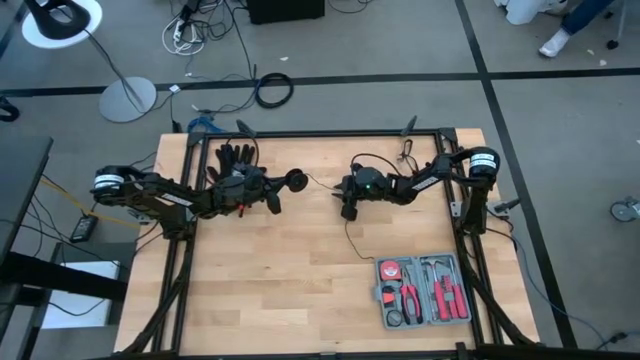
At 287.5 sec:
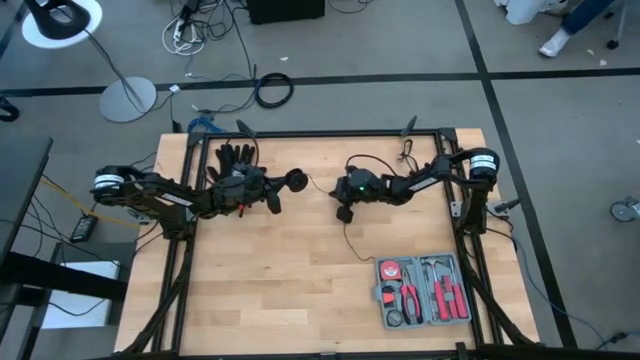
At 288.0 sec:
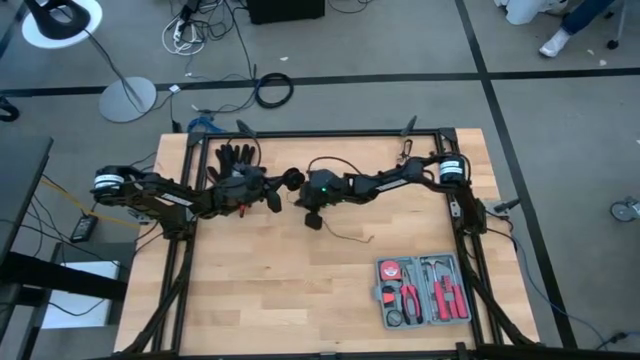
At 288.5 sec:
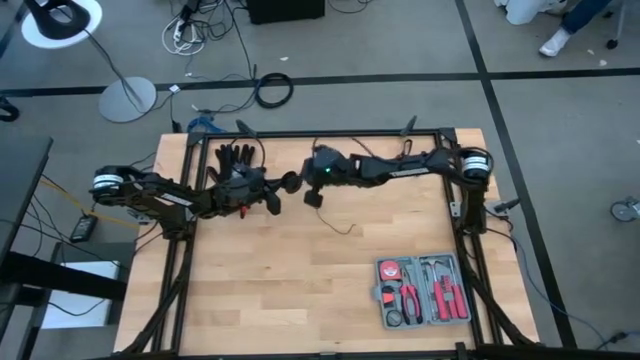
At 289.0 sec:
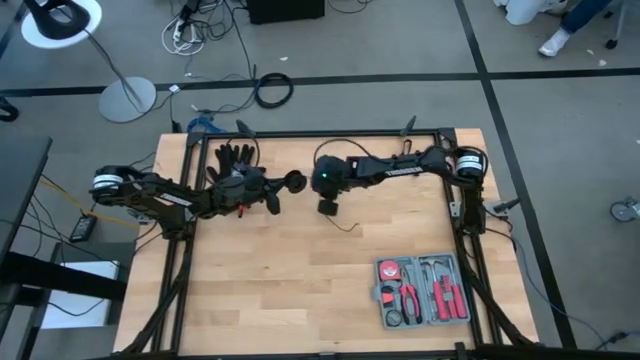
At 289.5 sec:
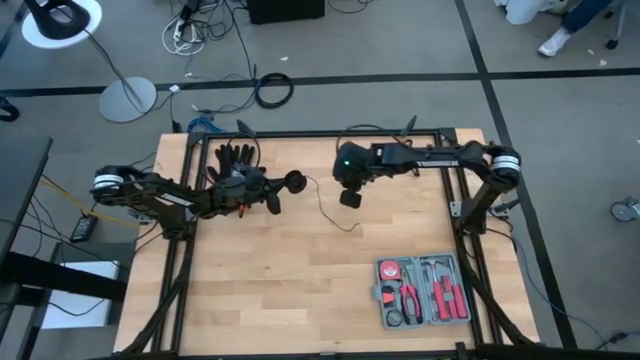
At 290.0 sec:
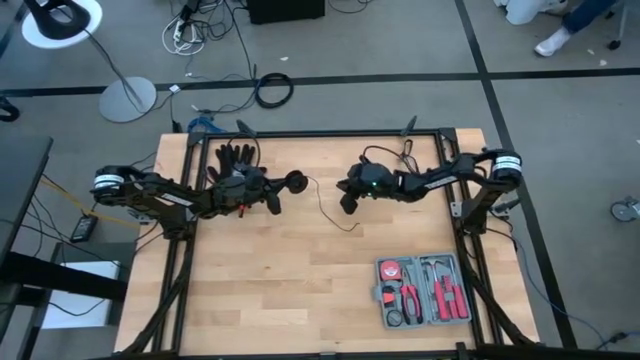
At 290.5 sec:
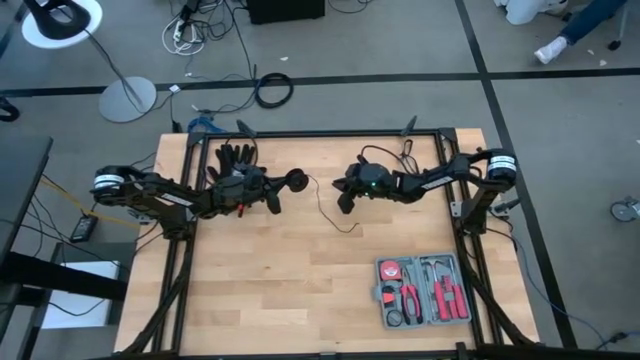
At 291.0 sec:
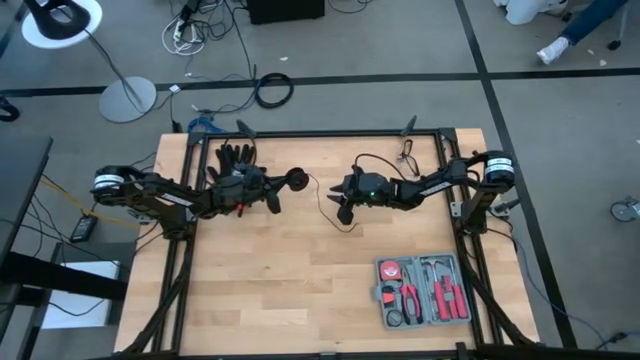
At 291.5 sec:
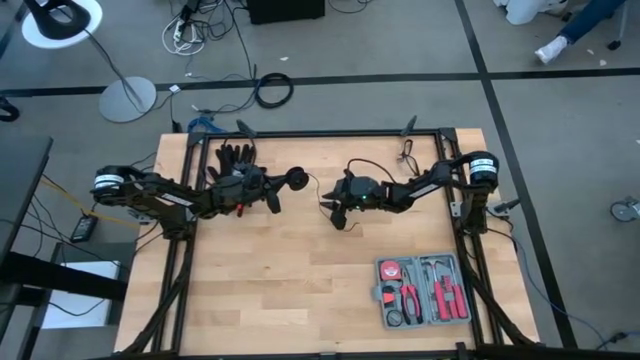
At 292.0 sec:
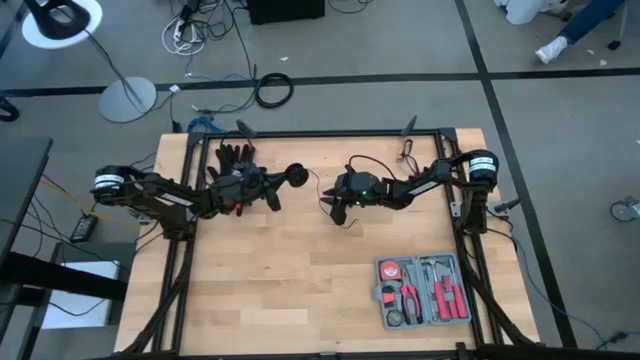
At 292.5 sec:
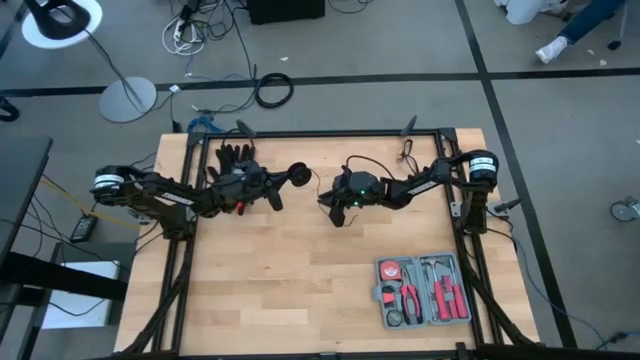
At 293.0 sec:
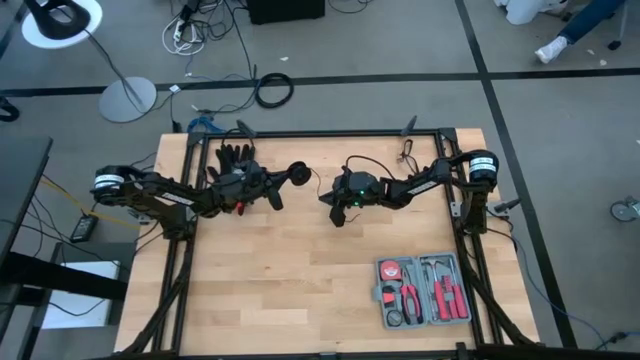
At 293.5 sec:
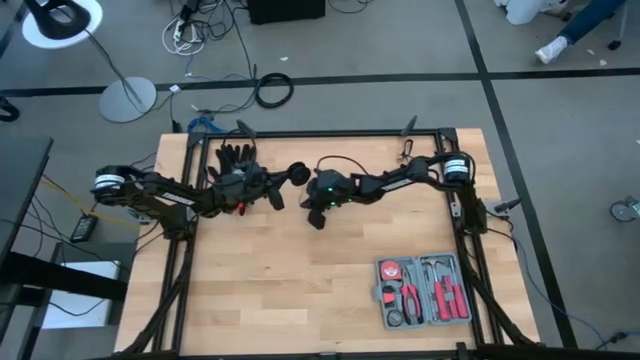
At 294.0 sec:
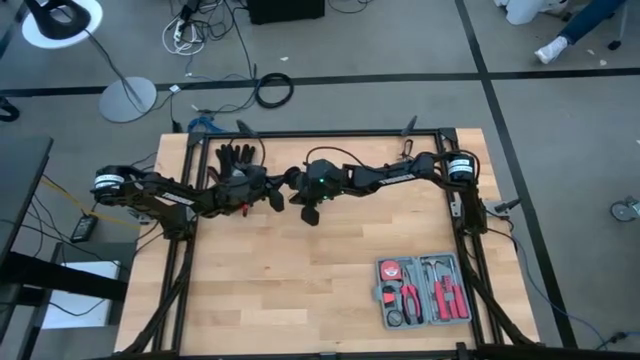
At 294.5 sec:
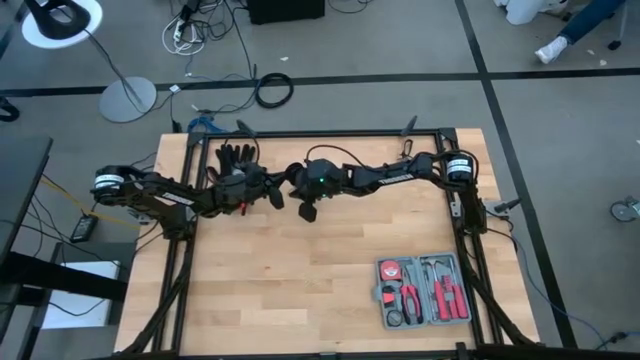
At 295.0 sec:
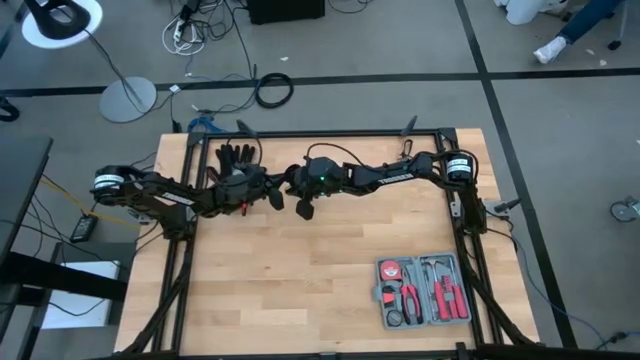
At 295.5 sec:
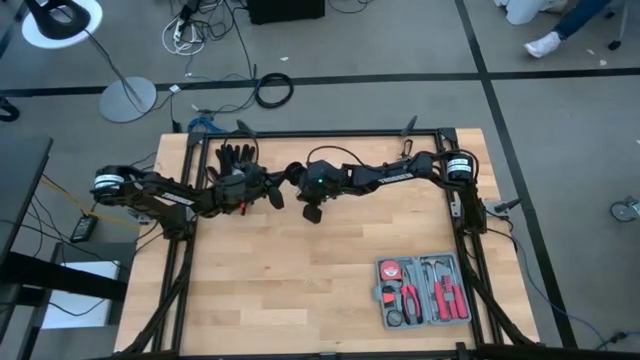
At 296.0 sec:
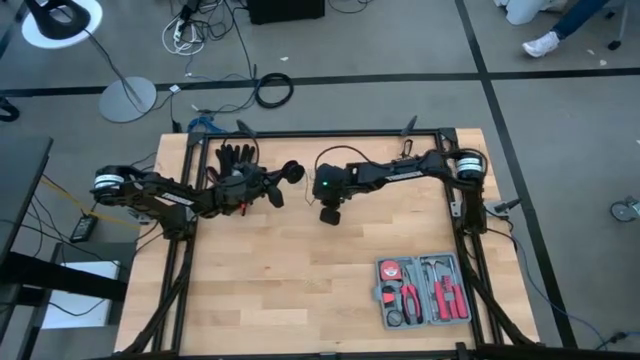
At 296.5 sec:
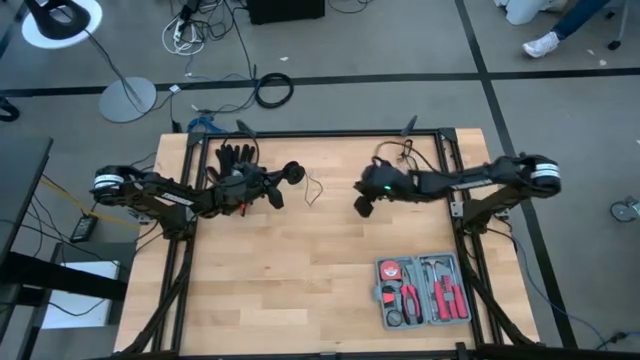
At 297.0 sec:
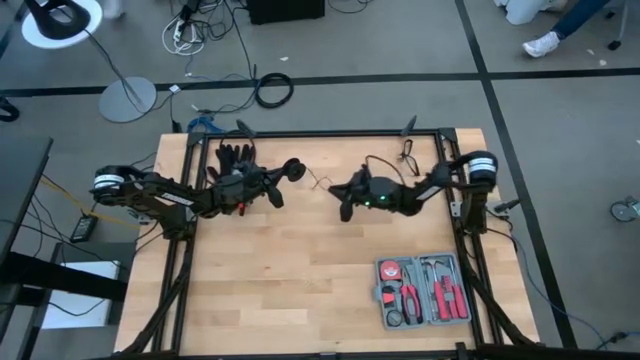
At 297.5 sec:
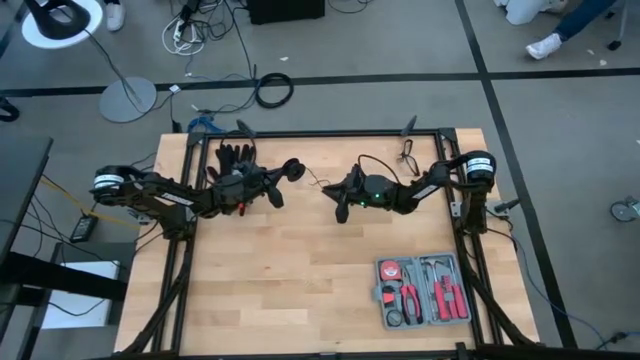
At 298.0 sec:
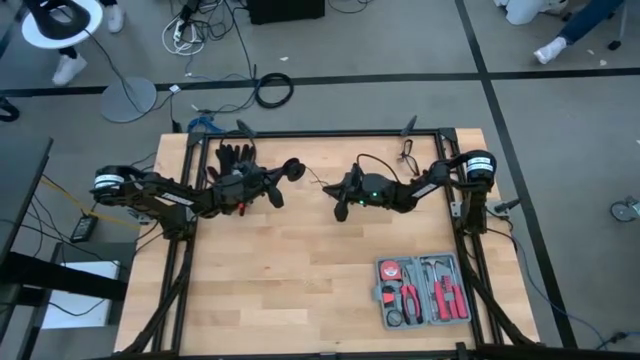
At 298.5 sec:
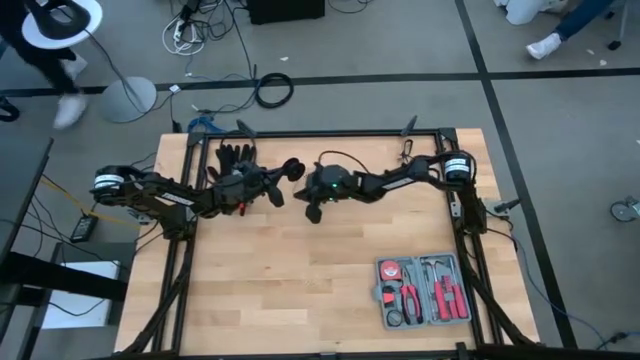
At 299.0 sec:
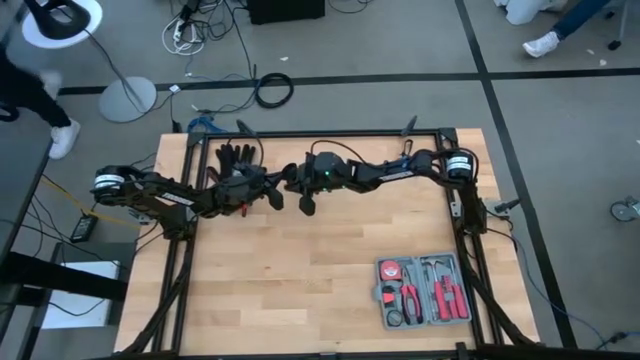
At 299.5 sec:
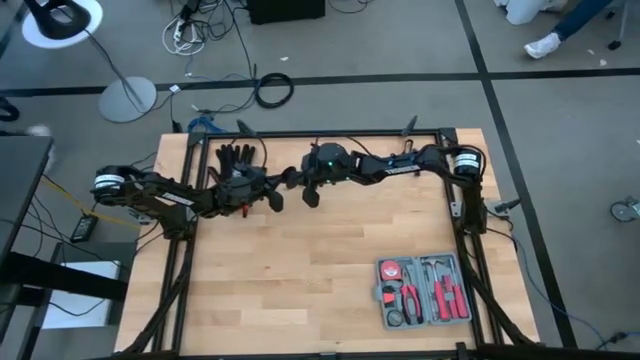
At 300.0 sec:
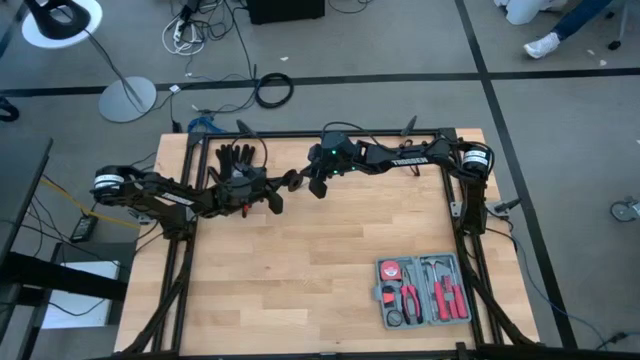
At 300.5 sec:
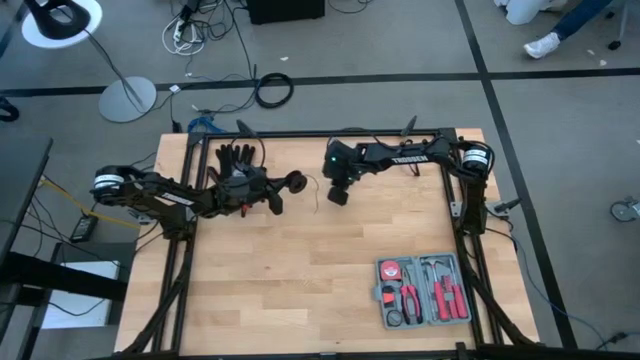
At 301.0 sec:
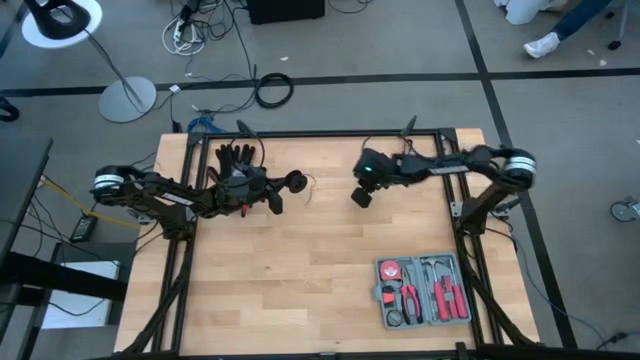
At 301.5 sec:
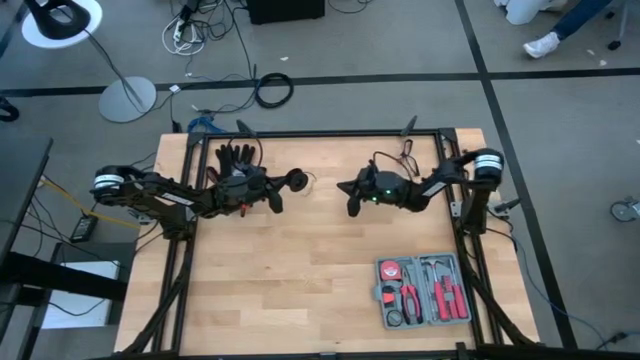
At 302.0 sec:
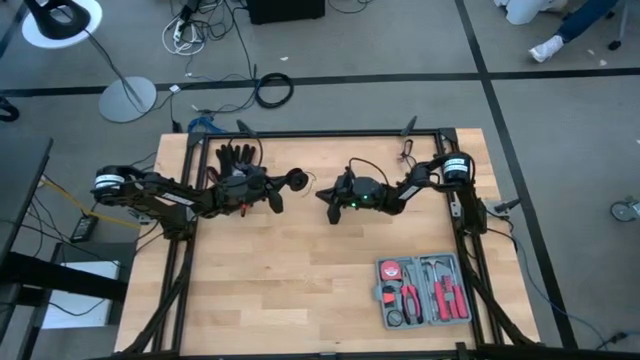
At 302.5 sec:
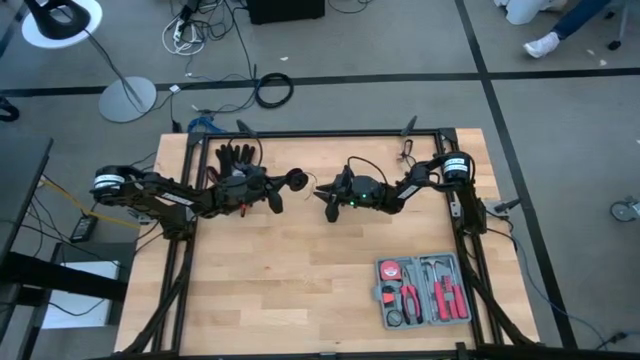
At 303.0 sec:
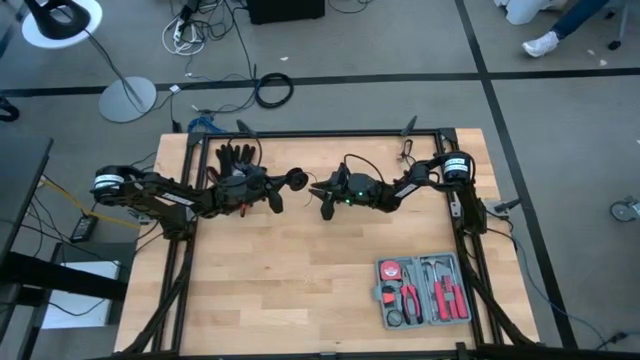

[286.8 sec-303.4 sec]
Task: Coil cords
Coil the black wire

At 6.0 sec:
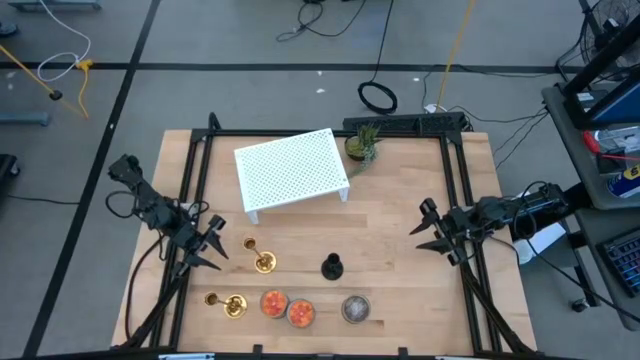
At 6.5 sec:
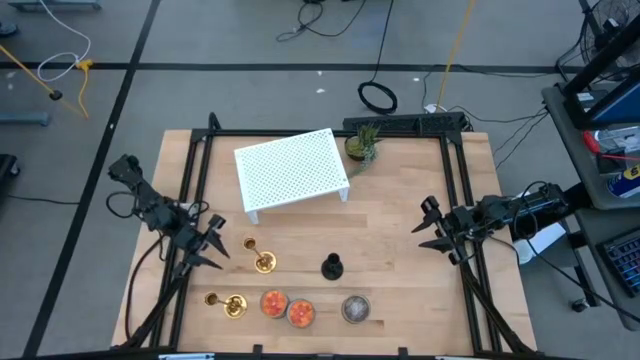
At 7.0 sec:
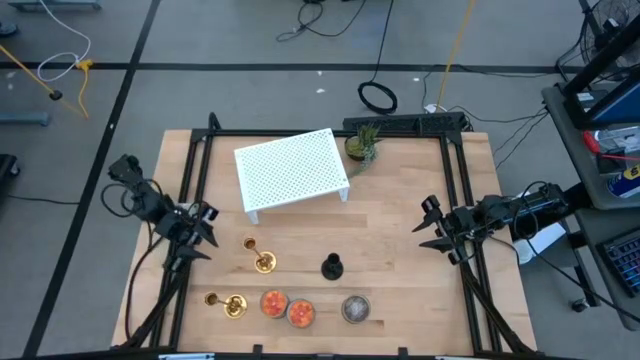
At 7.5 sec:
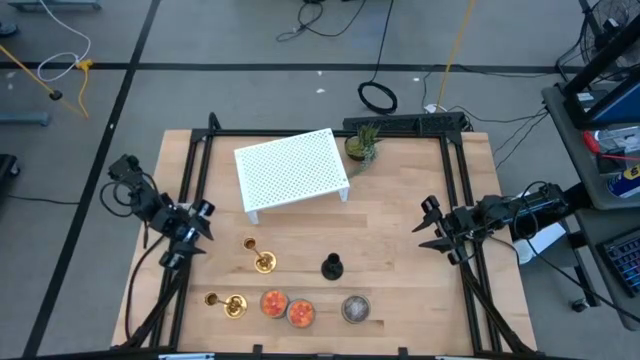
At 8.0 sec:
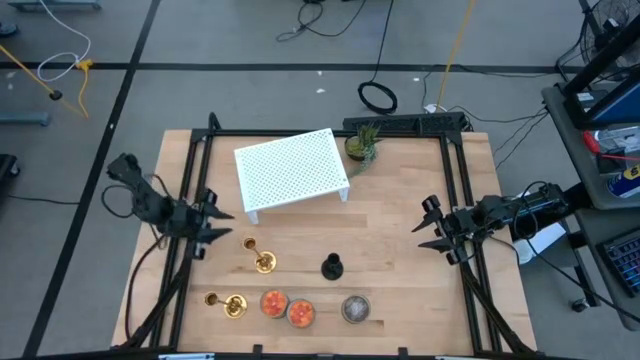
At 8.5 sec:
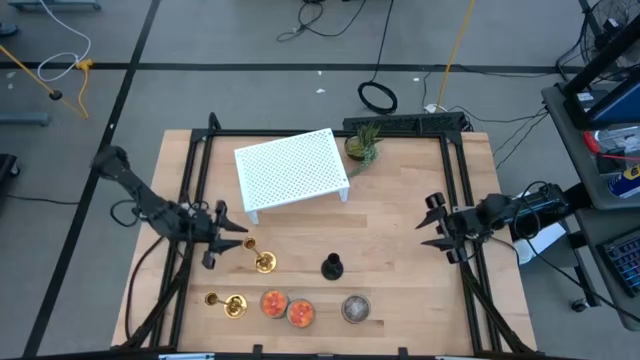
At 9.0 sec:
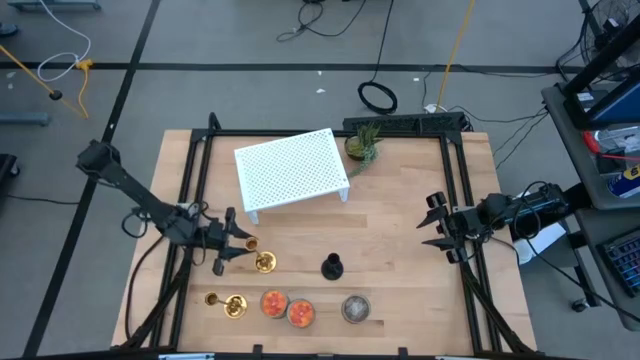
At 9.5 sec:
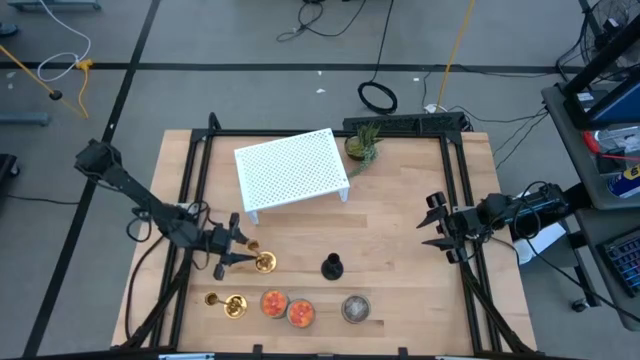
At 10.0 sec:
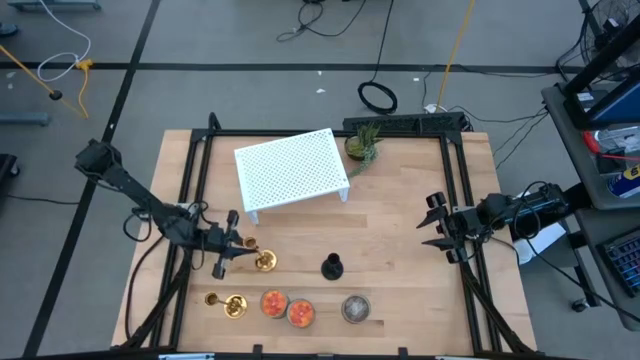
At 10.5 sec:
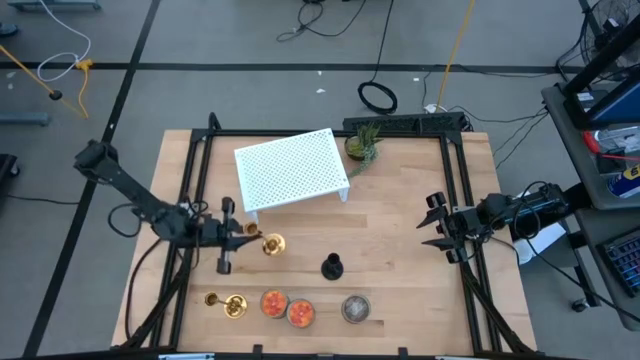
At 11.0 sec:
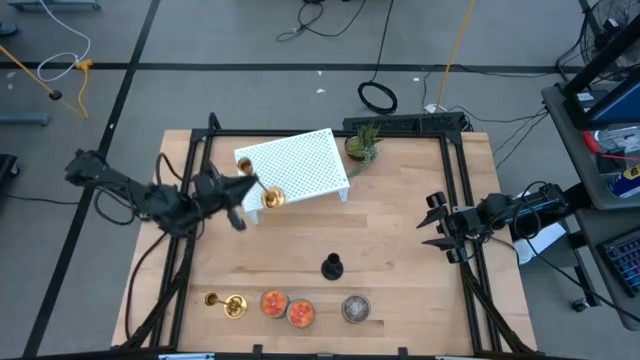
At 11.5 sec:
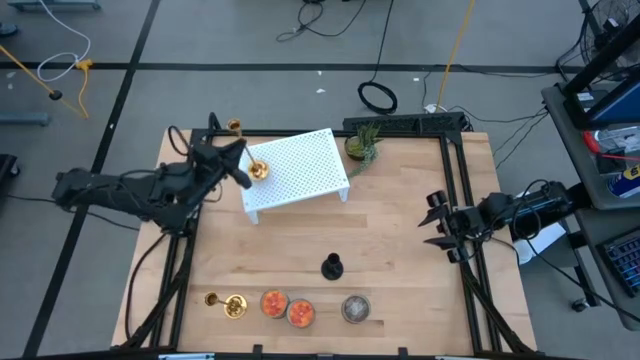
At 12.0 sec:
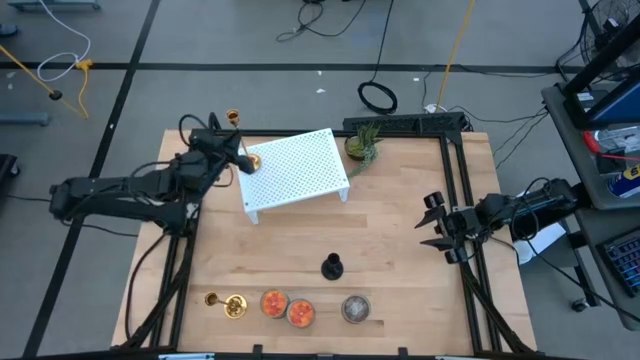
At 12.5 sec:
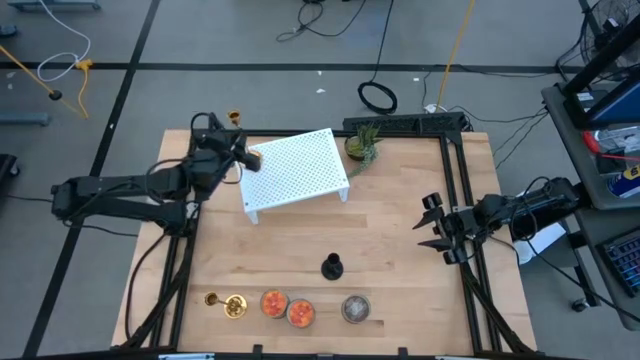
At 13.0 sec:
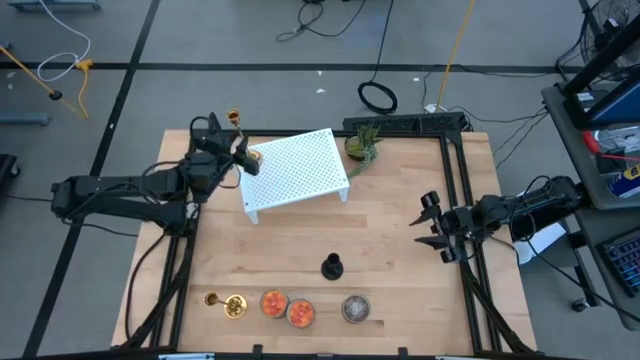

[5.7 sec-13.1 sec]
Task: Pick & Place candle stick holders
Put the top left gold candle holder on the shelf
